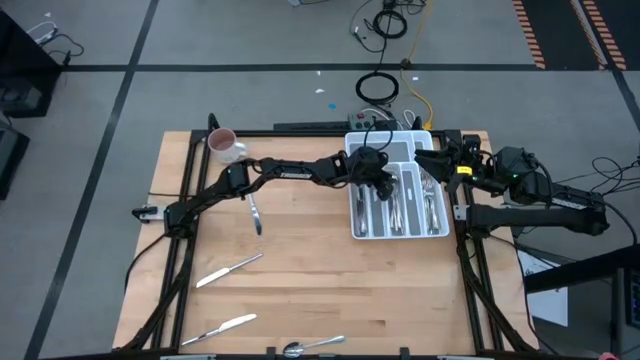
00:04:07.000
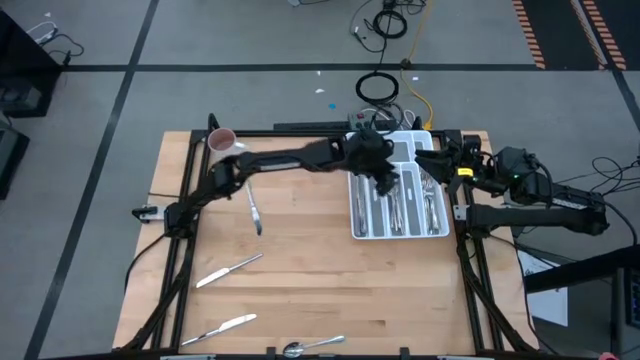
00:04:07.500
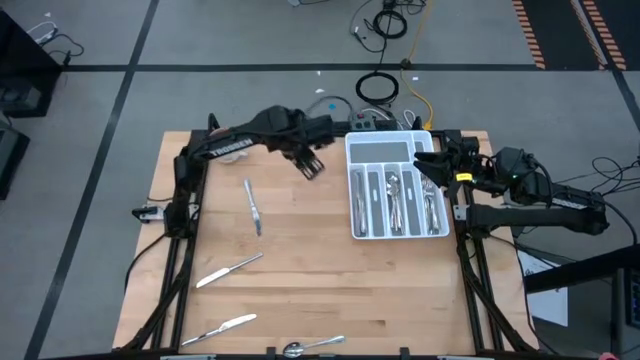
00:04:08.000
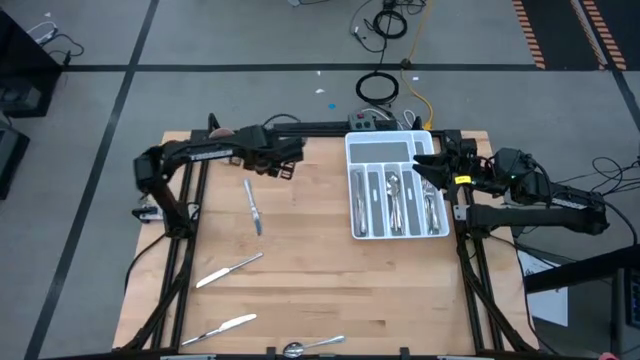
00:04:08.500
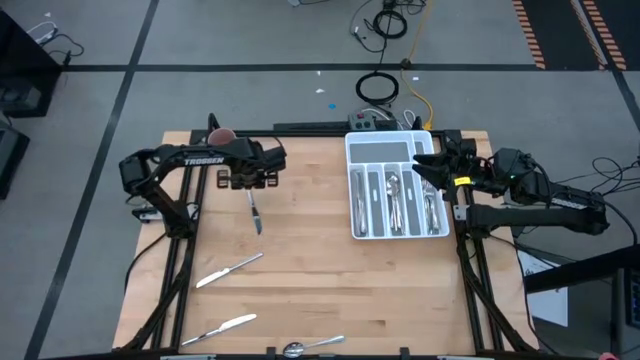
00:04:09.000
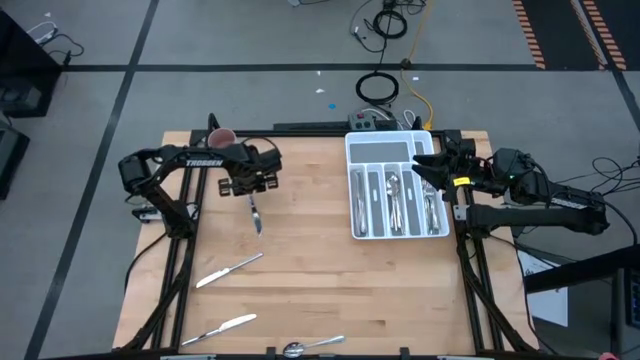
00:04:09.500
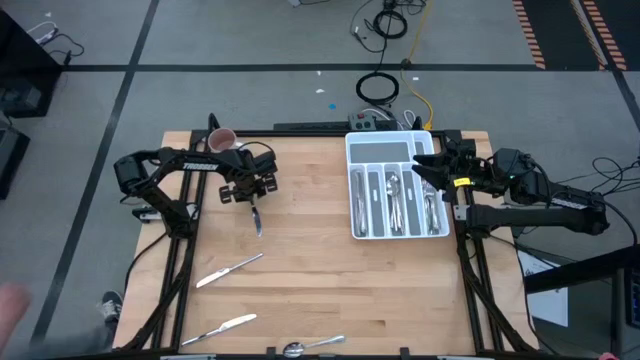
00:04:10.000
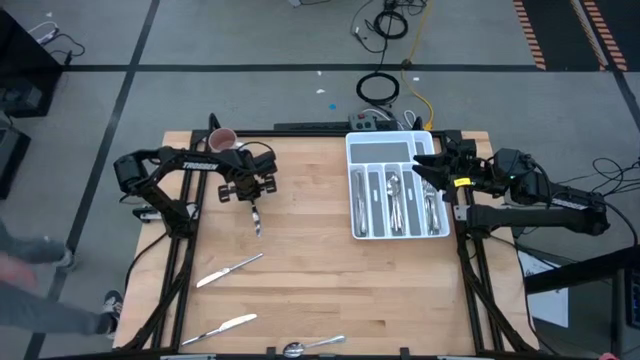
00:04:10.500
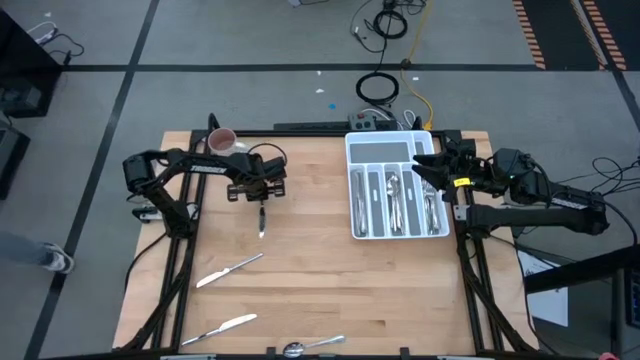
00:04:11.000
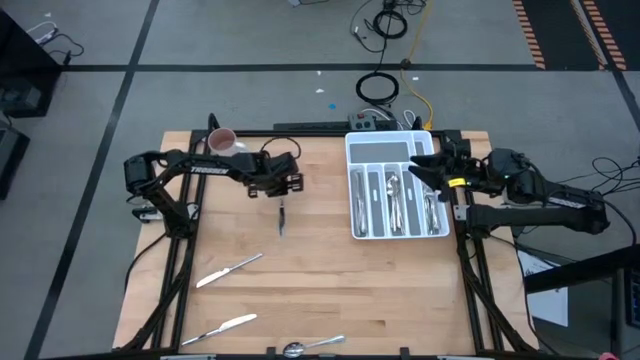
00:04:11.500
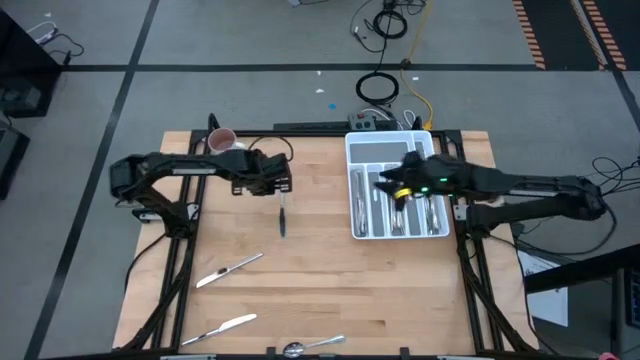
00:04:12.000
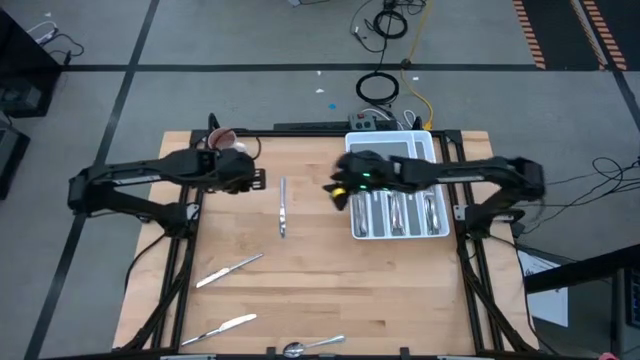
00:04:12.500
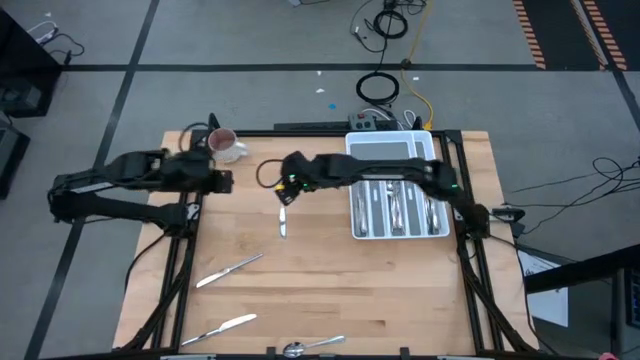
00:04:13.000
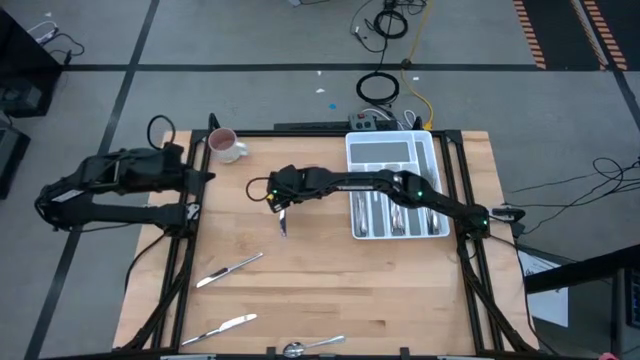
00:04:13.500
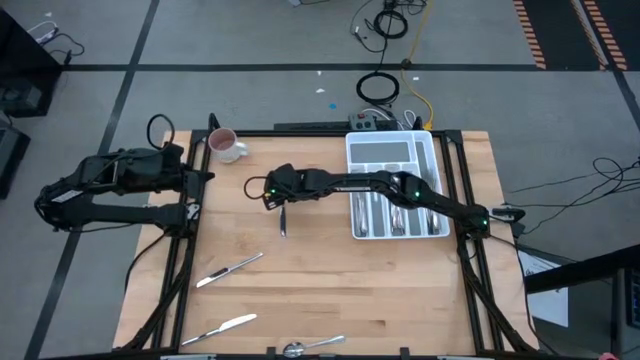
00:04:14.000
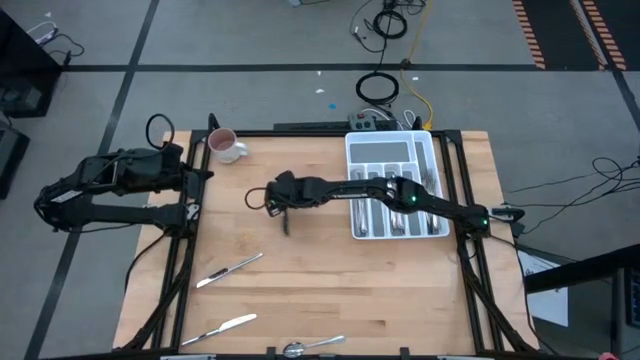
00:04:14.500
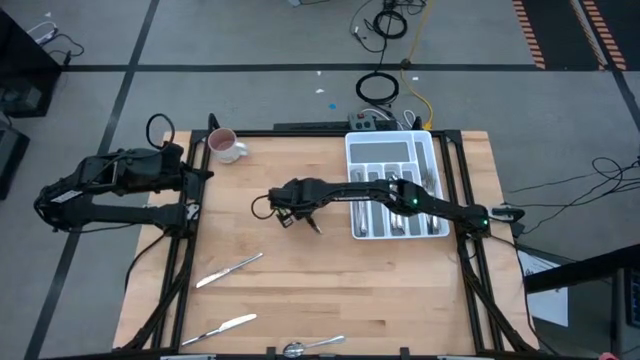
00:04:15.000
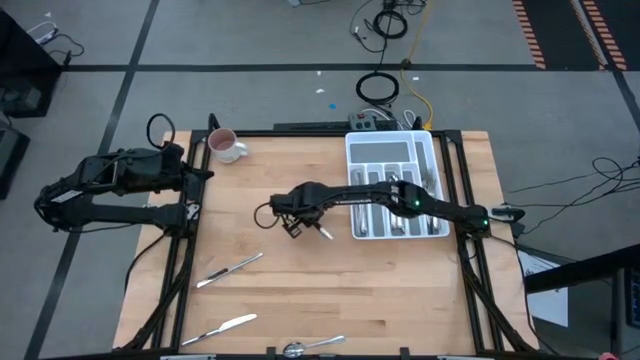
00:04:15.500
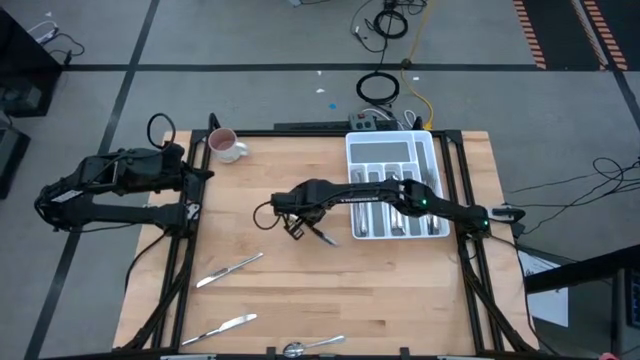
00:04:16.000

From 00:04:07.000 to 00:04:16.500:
Task: Sort silverware
Put the top knife in the left section of the silverware tray

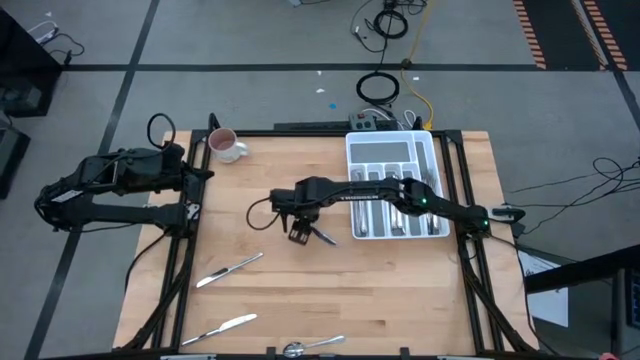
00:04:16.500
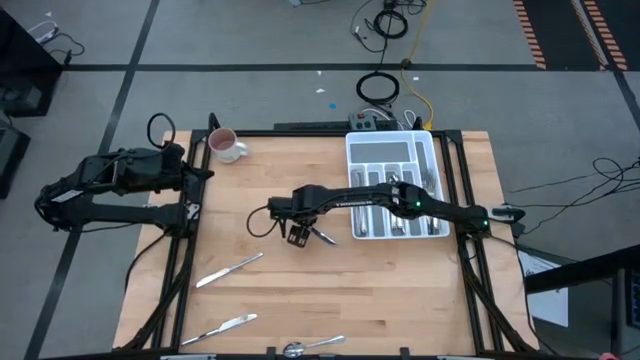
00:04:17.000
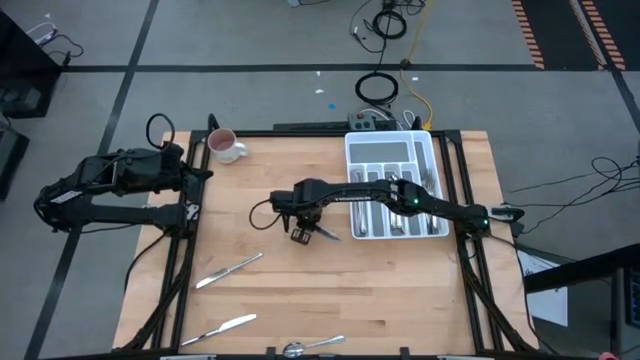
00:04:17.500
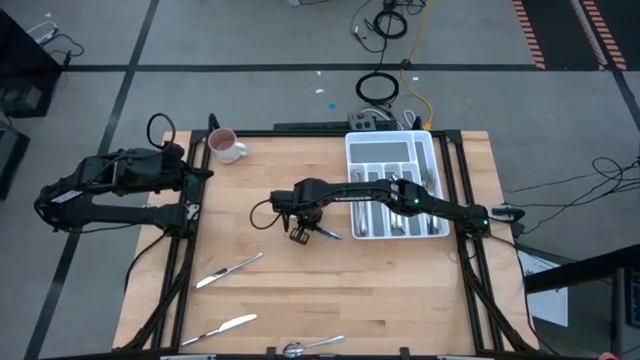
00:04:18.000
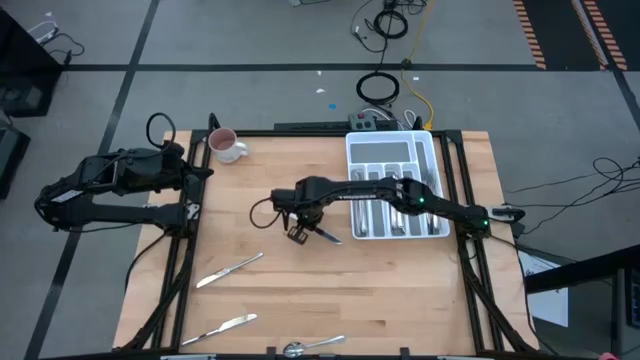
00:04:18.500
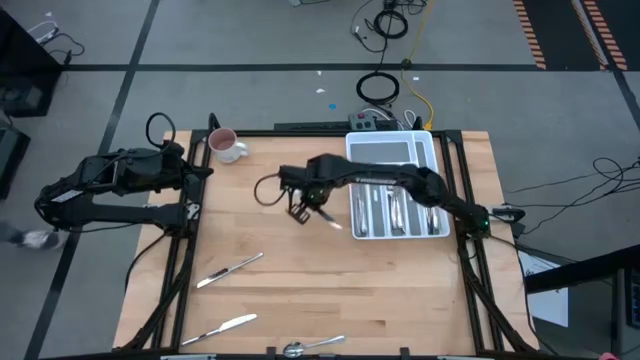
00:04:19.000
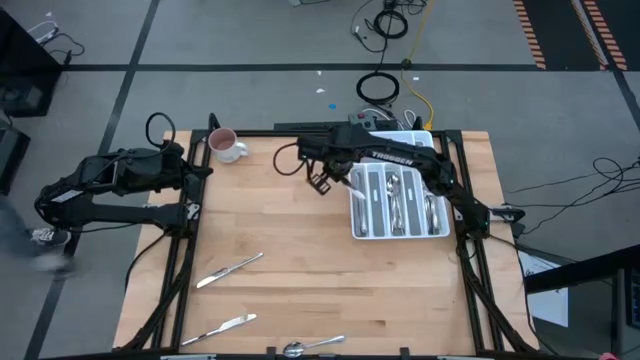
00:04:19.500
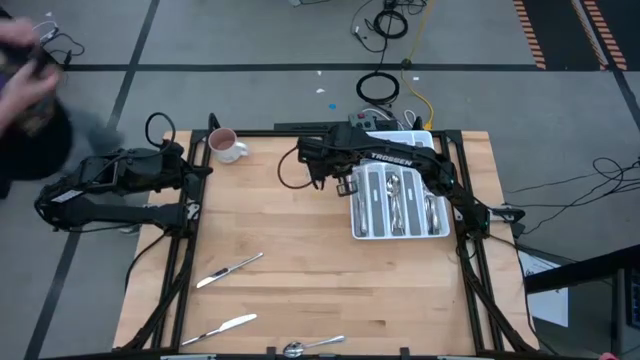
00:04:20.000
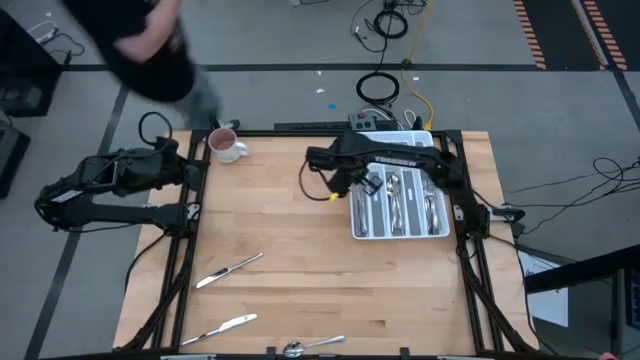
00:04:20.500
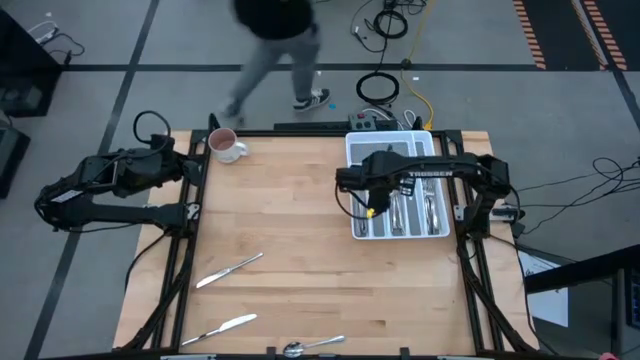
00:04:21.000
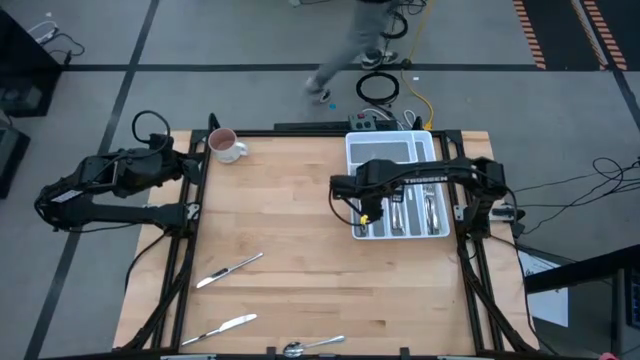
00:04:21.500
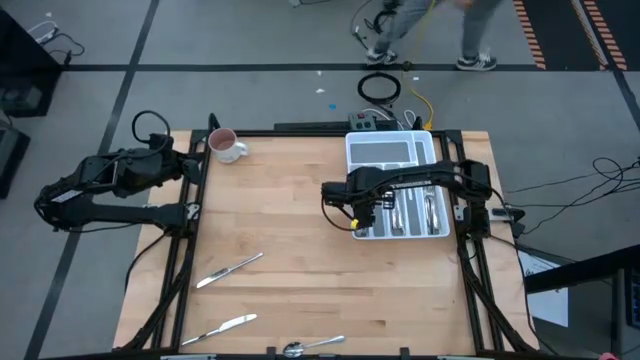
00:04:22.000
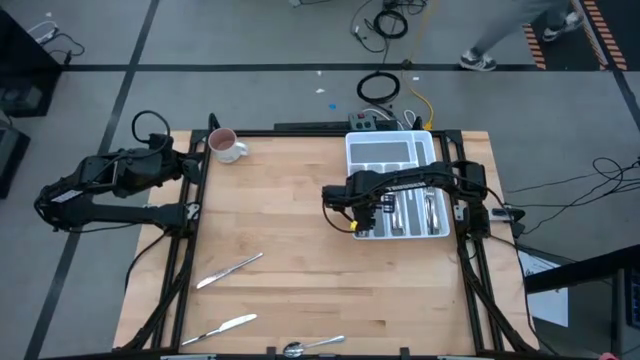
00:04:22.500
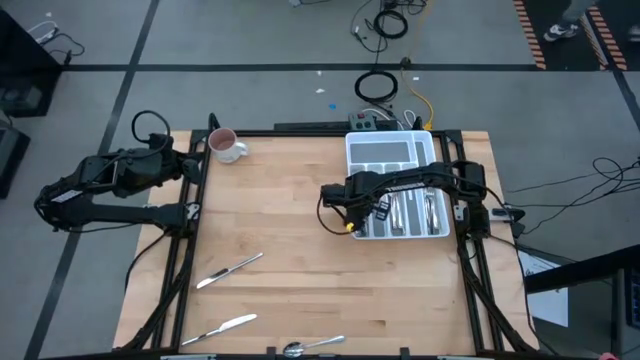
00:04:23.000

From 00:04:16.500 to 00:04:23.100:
Put the top knife in the left section of the silverware tray

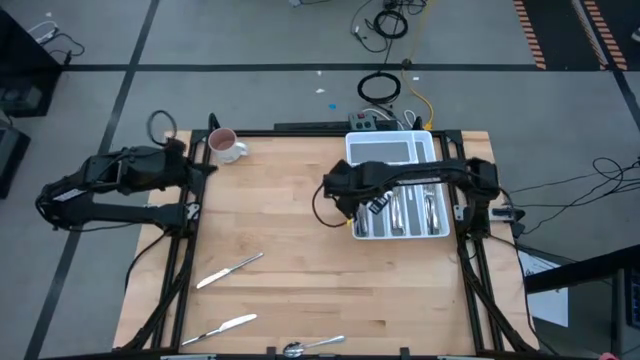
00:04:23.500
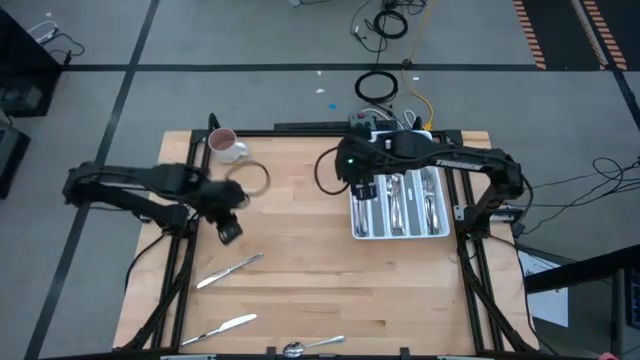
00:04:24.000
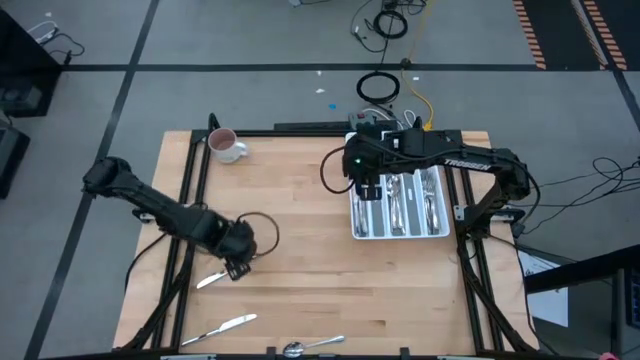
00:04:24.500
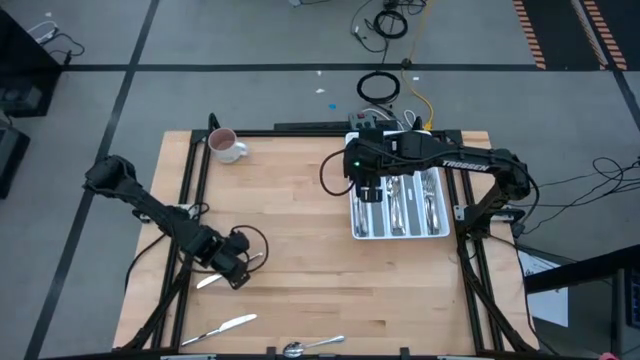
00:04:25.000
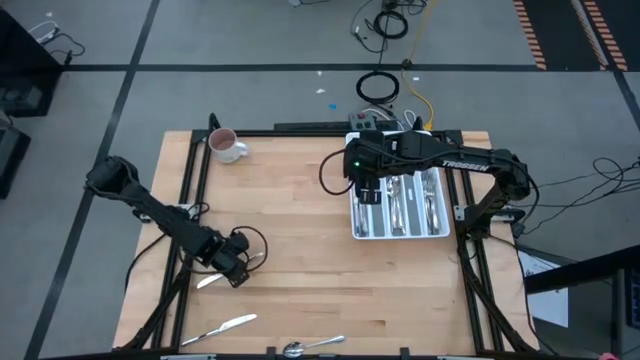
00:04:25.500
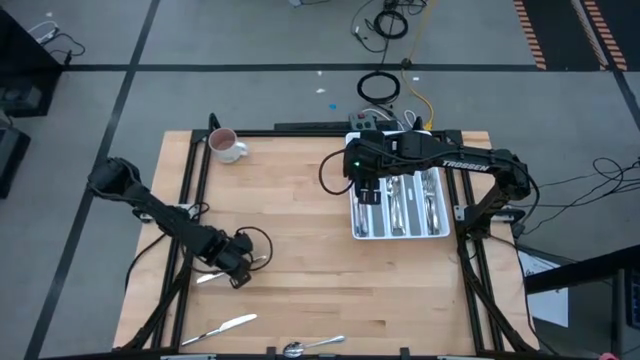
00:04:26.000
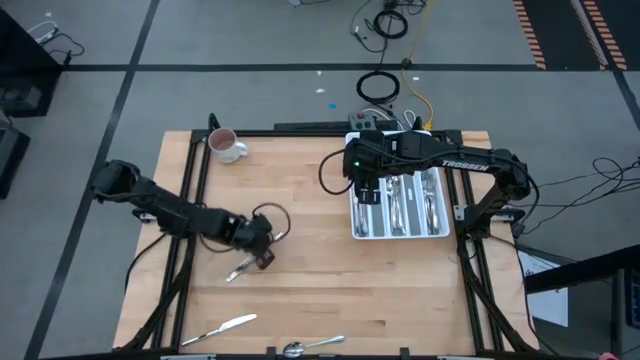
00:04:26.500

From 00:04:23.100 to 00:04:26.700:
Put the top knife in the left section of the silverware tray
